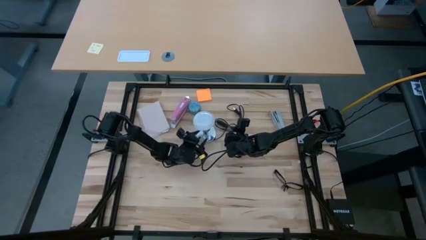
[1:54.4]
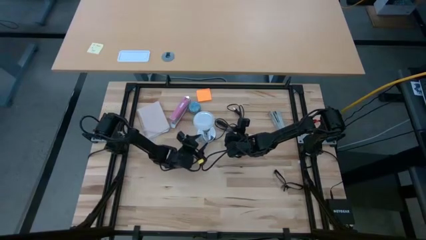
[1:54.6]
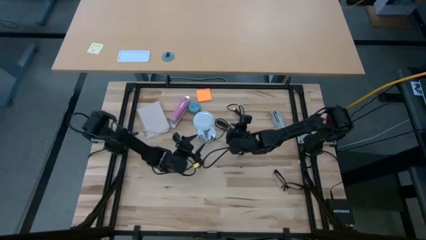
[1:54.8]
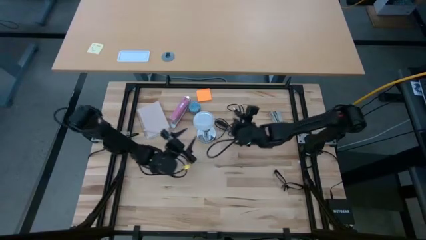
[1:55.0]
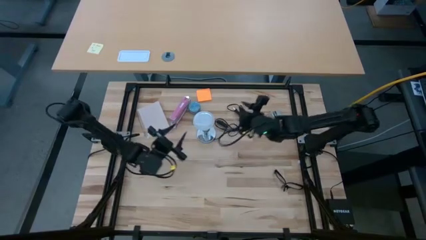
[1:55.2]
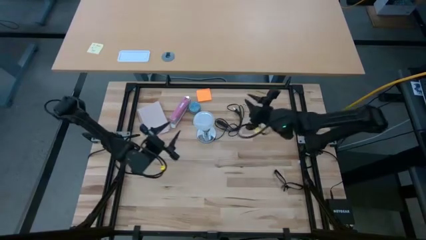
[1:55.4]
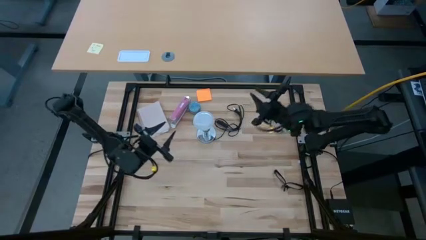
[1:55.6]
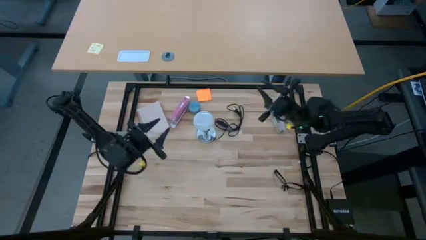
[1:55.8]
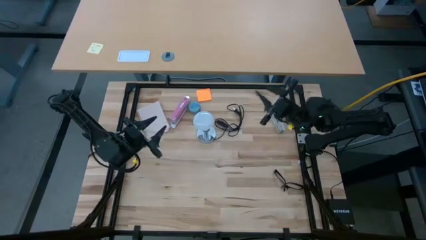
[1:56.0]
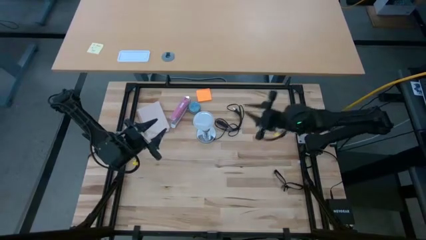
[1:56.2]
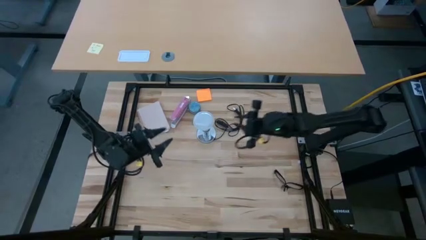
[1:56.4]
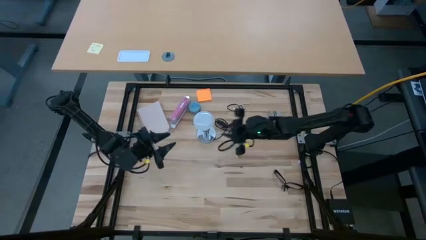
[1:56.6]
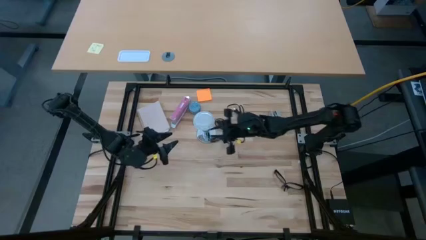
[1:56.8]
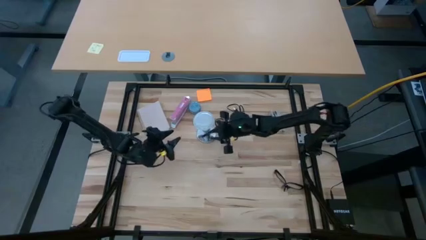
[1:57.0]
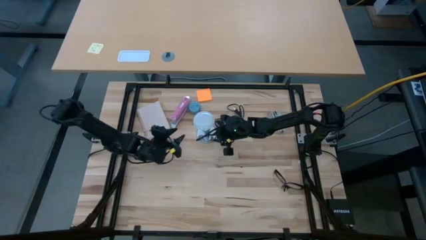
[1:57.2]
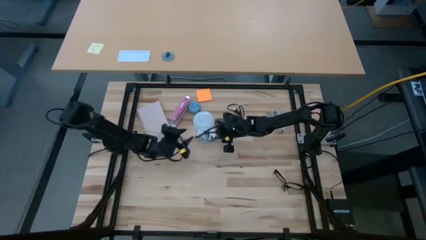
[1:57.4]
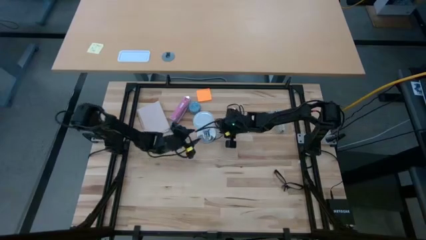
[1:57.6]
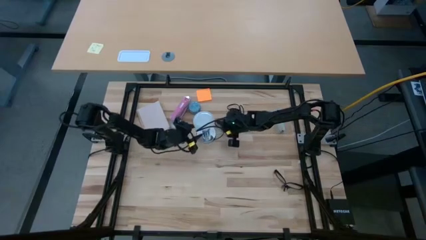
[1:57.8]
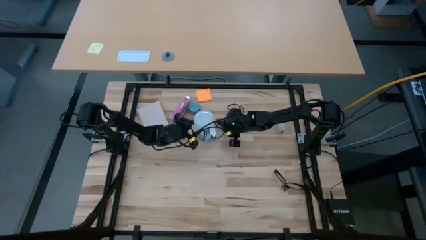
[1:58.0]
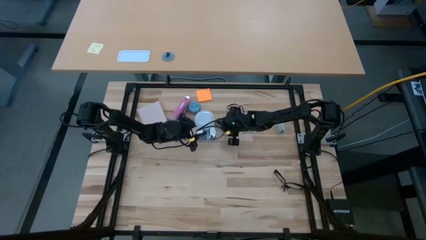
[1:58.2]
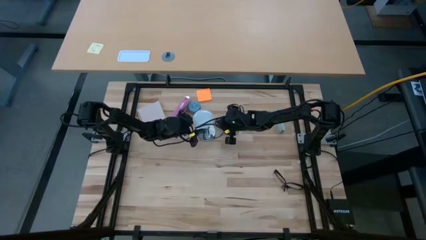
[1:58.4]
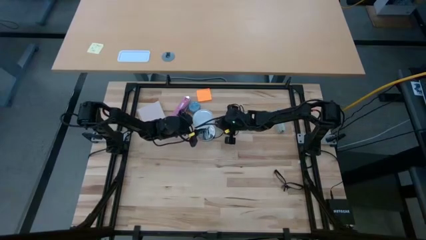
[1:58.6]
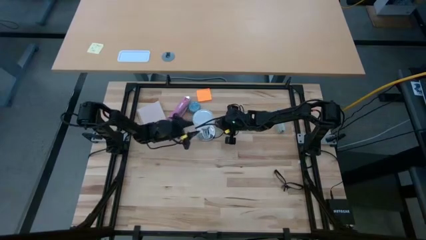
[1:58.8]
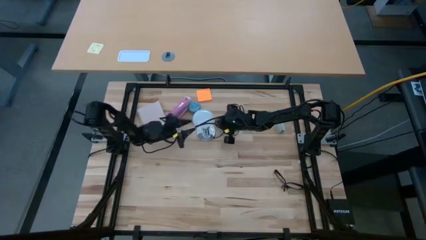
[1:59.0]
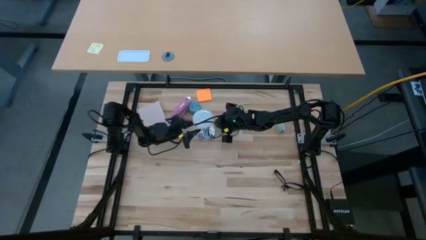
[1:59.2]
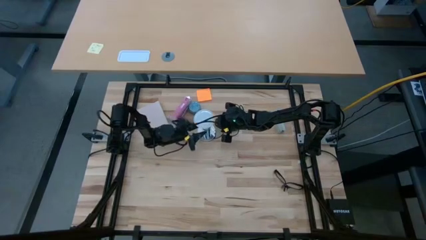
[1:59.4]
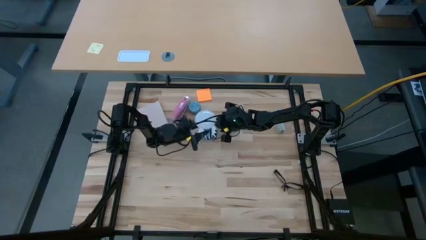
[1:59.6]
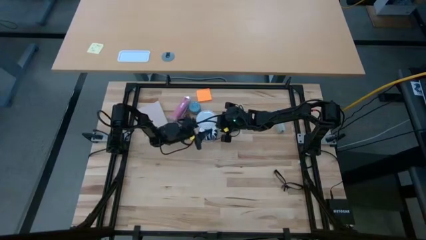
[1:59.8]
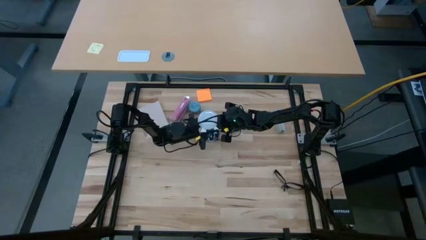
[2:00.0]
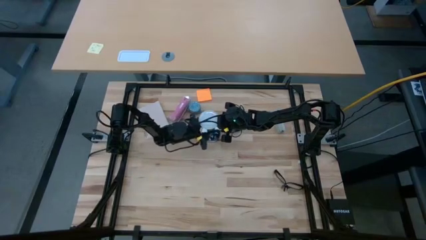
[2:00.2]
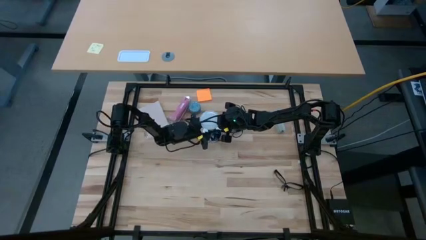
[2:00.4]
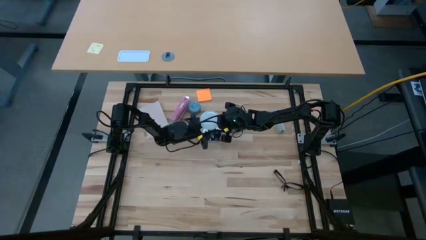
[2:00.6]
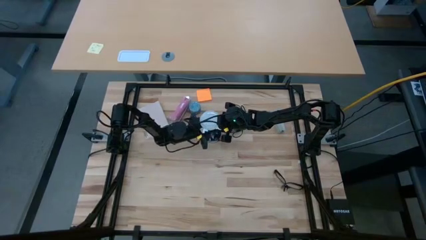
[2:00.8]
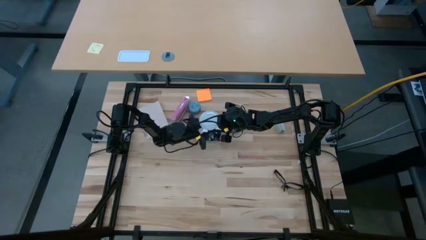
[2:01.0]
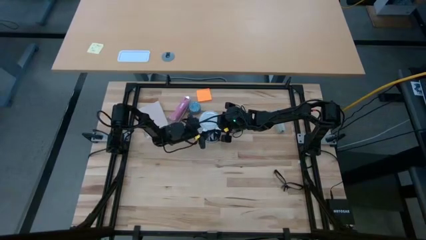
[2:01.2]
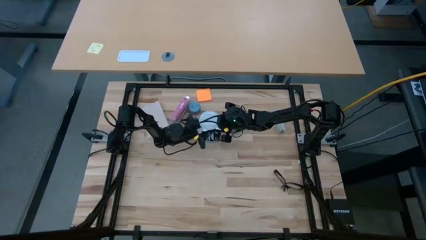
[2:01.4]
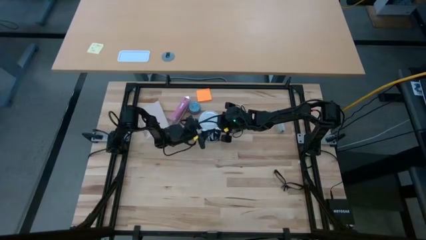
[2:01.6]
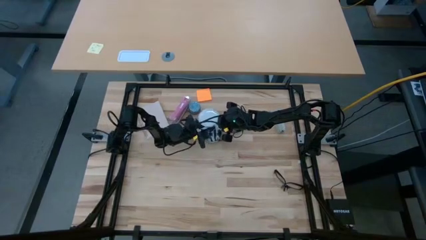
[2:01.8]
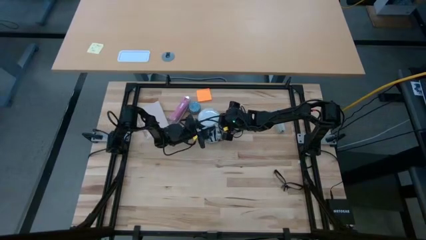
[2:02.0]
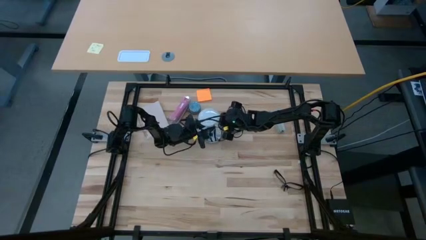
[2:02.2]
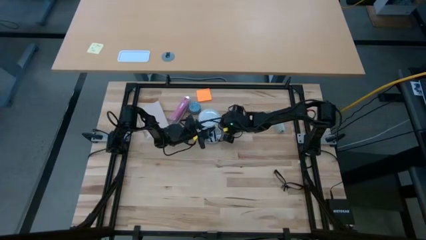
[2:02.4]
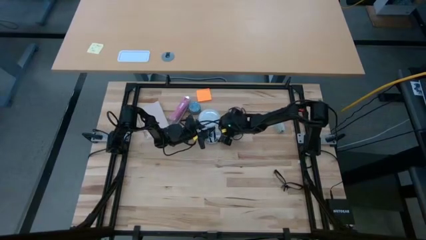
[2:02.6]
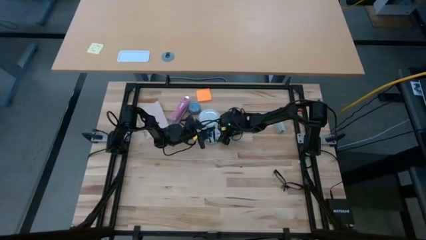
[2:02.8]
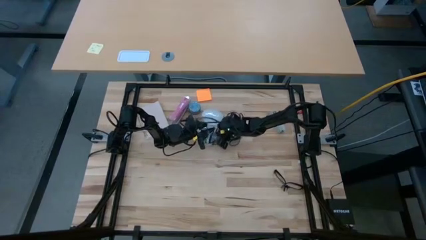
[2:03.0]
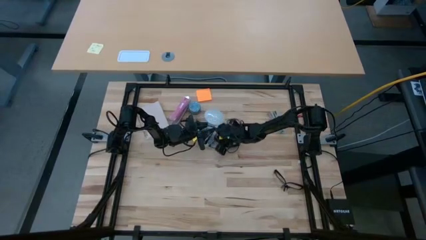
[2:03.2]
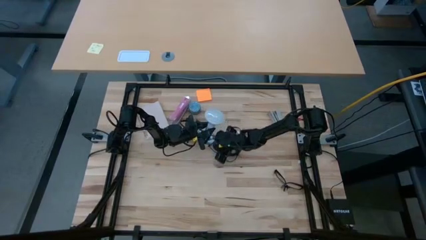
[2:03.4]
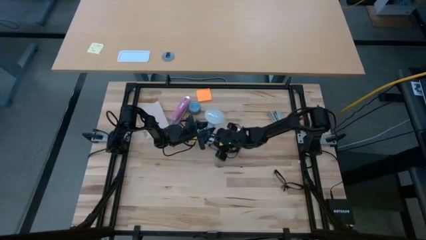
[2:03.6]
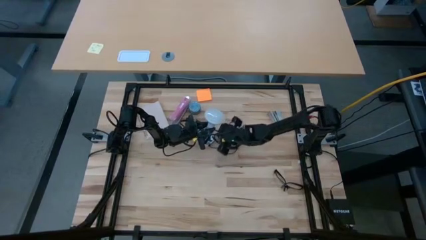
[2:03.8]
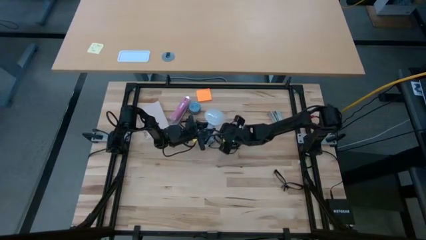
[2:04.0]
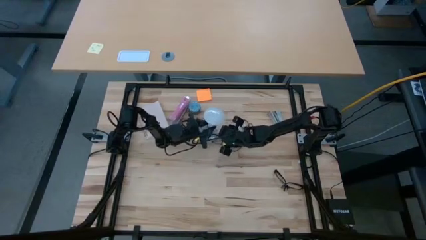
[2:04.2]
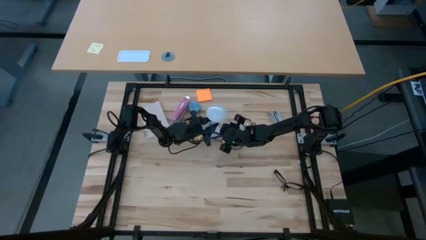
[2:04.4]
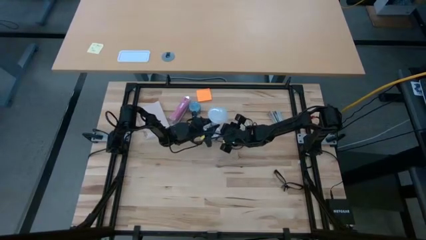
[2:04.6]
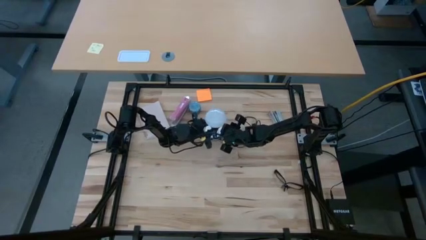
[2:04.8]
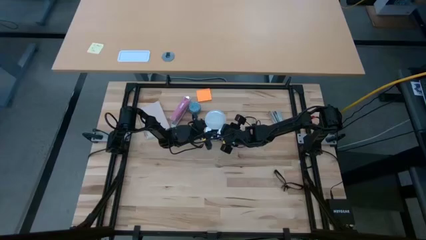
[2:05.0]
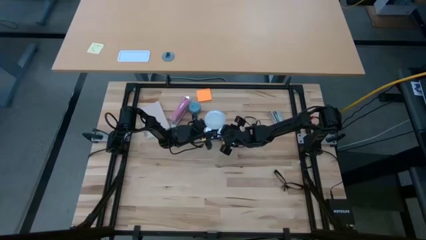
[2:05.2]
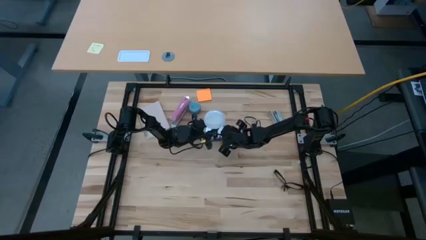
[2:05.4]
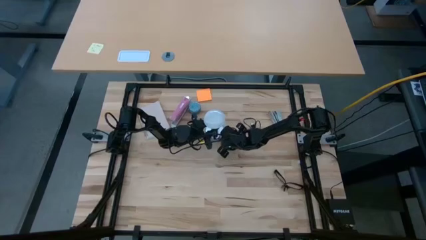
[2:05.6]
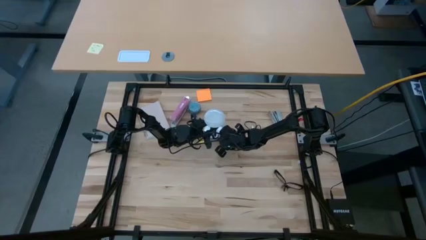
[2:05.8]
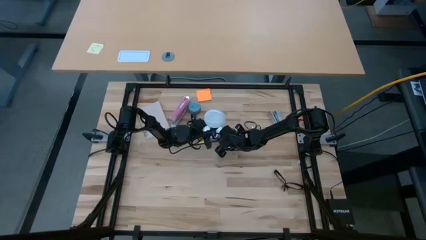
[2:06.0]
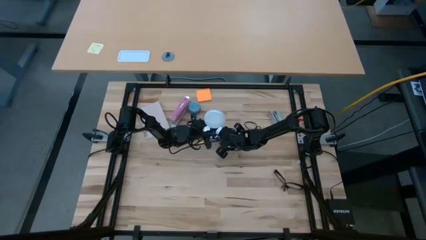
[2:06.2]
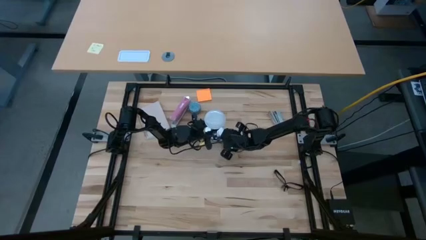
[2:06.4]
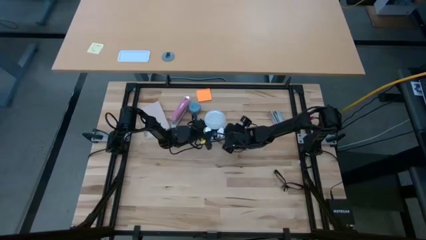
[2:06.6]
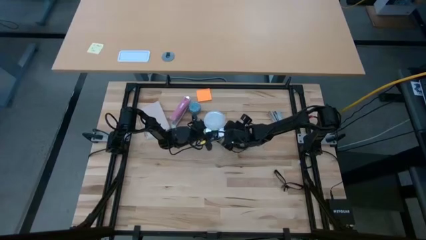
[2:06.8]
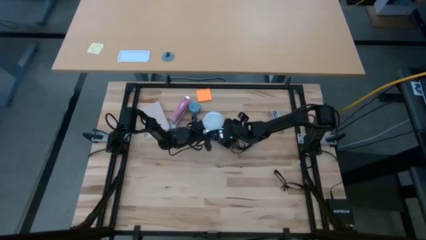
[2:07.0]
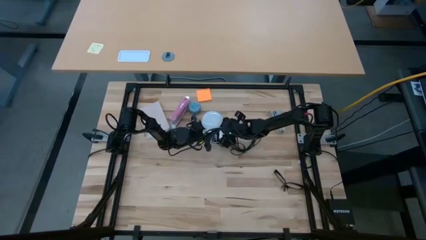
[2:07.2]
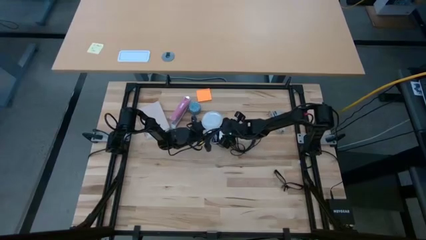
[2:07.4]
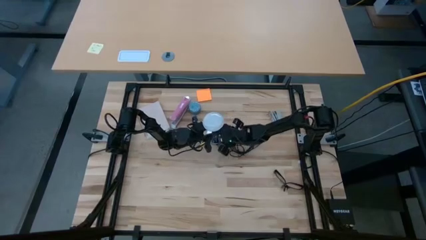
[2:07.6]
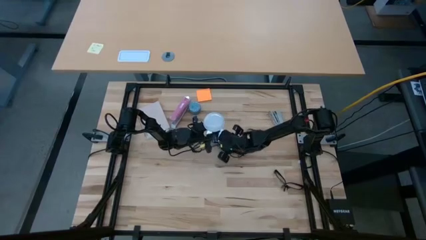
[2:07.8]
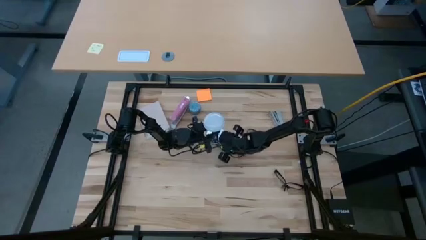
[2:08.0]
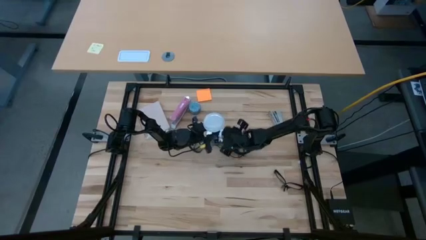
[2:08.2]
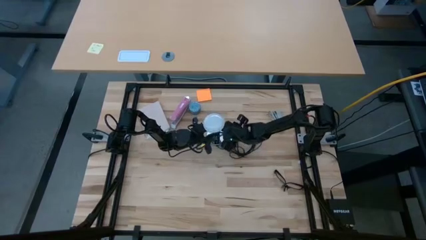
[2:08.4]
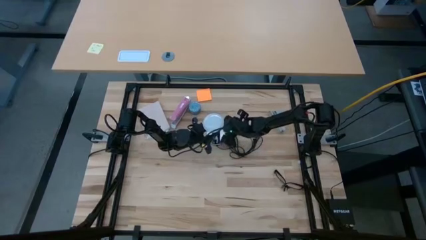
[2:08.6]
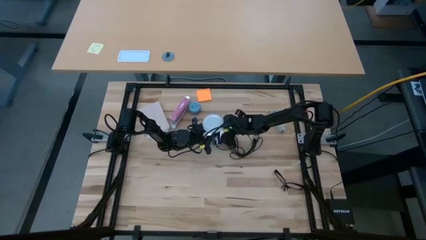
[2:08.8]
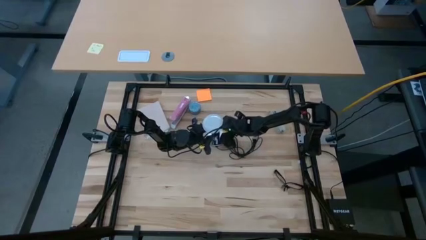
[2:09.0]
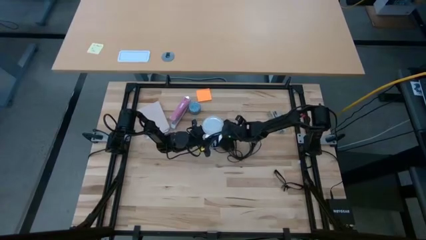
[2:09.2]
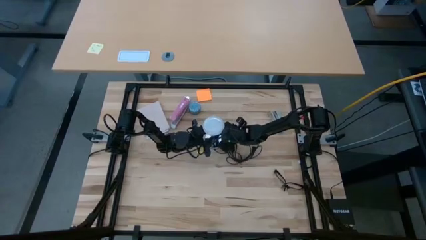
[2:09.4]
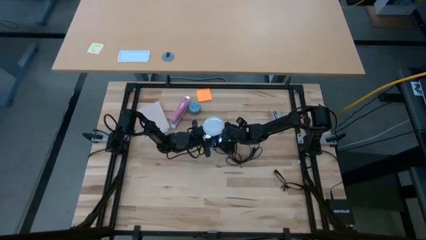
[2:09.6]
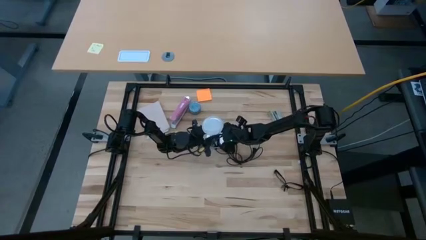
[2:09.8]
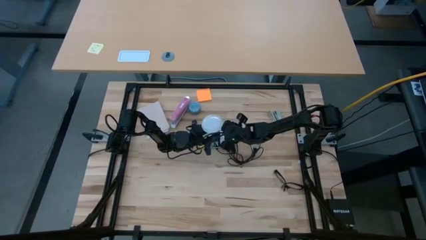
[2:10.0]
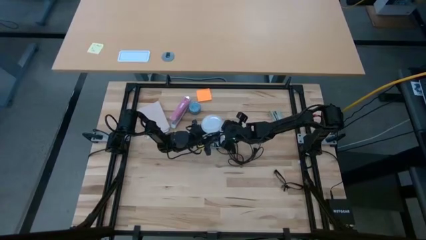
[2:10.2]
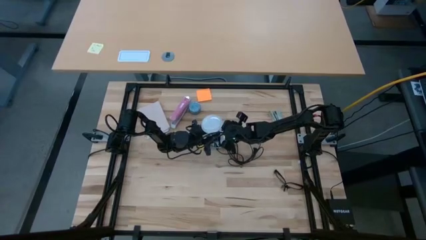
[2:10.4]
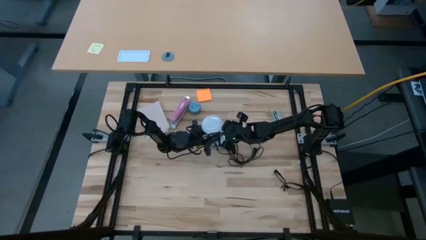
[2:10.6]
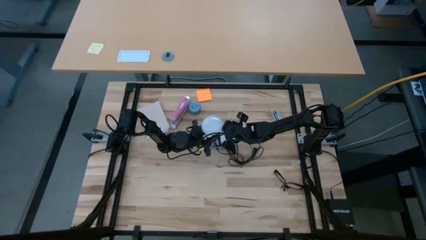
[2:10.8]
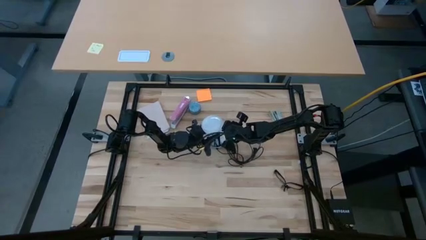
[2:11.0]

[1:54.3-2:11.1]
Task: Screw lightbulb
Remove the lightbulb from the lamp
